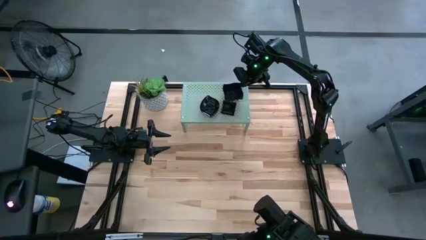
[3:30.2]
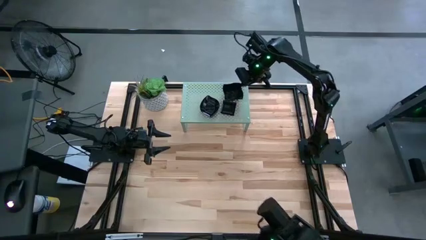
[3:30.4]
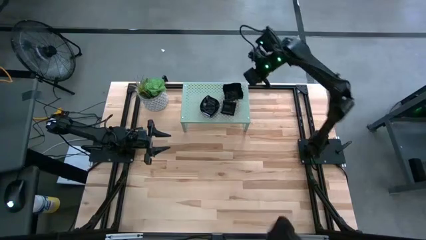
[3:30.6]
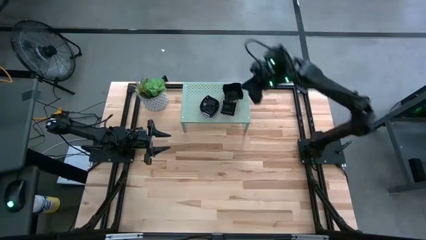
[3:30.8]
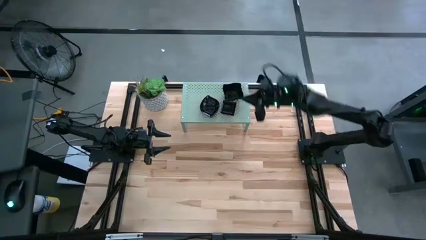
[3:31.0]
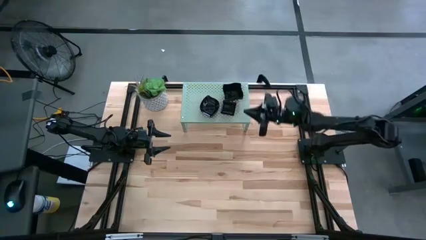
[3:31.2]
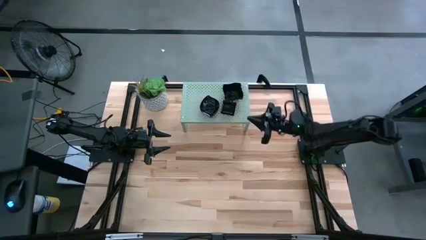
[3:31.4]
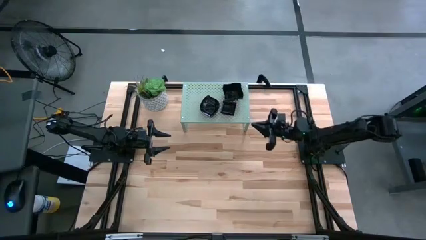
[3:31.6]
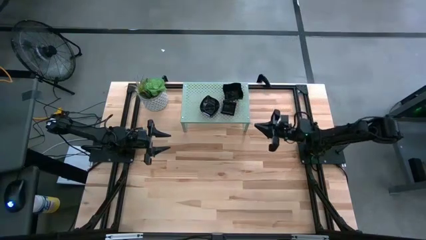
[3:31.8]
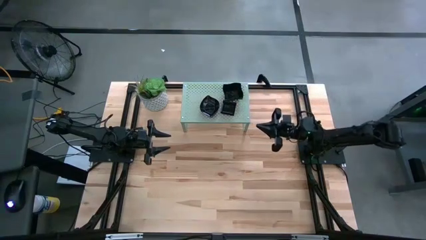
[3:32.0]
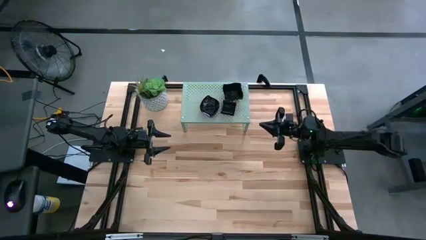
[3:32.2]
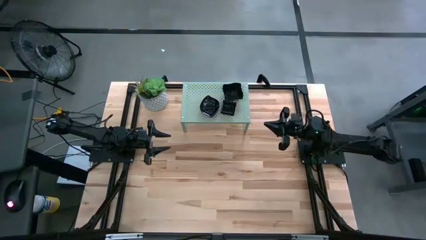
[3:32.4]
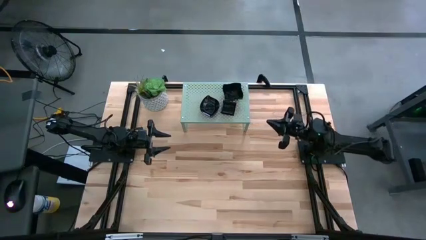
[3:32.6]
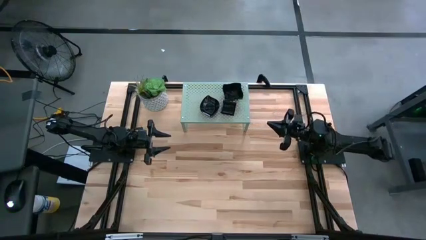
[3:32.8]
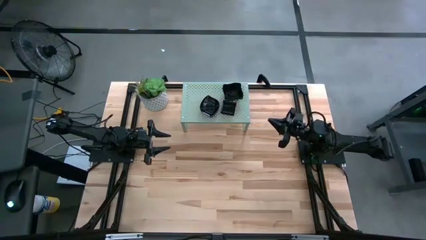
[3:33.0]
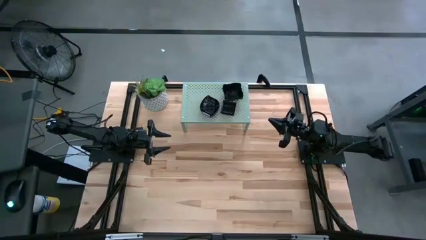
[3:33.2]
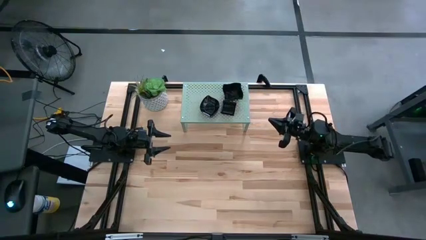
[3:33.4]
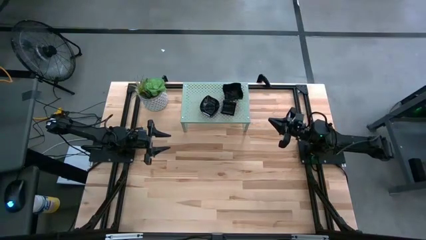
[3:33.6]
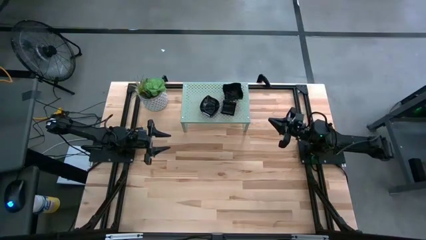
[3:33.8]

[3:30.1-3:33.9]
Task: Pick & Place Mini shaped plates
Return to Home Position

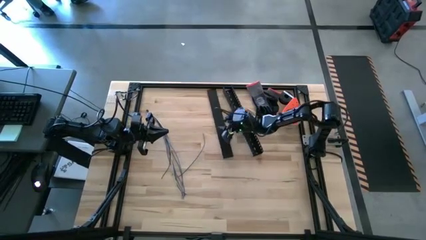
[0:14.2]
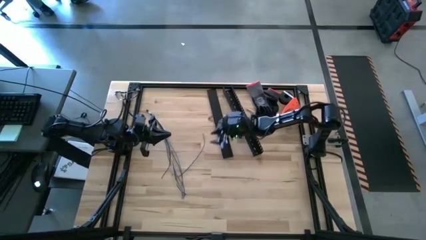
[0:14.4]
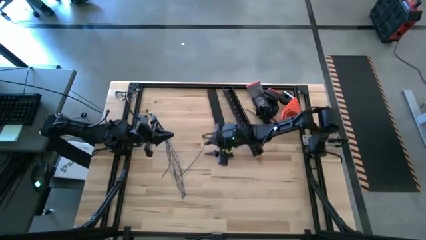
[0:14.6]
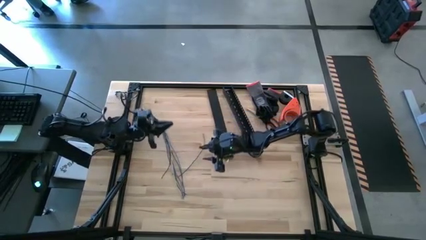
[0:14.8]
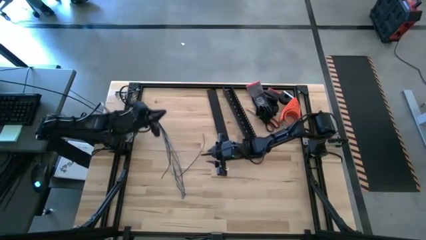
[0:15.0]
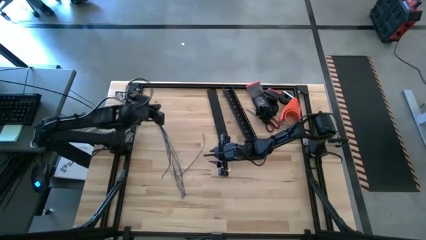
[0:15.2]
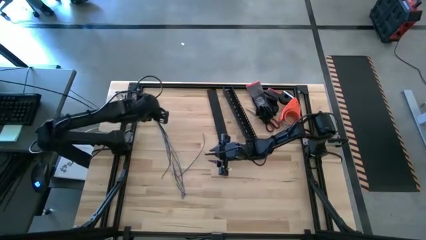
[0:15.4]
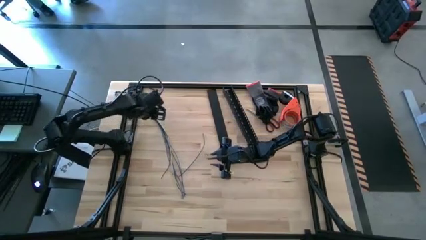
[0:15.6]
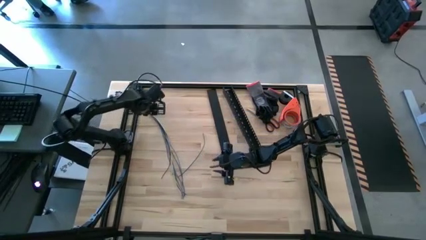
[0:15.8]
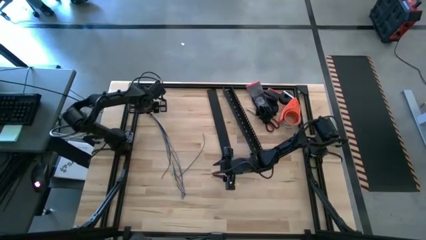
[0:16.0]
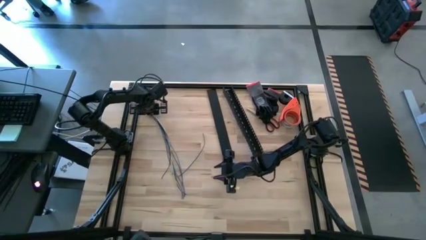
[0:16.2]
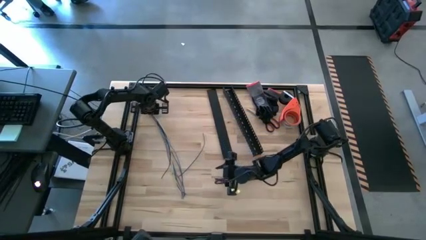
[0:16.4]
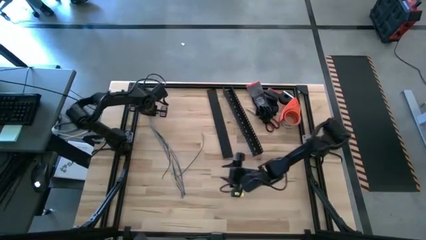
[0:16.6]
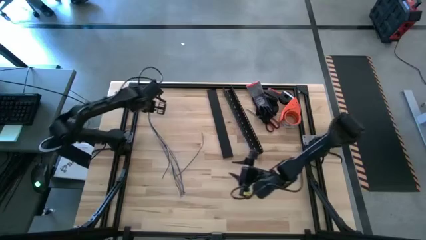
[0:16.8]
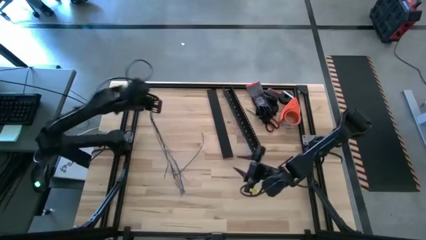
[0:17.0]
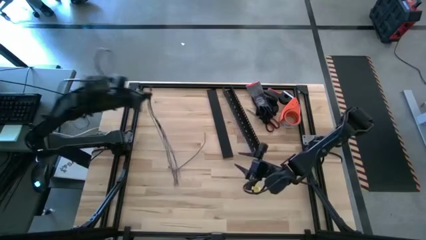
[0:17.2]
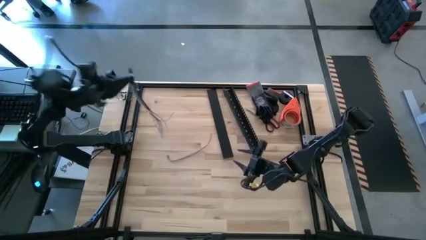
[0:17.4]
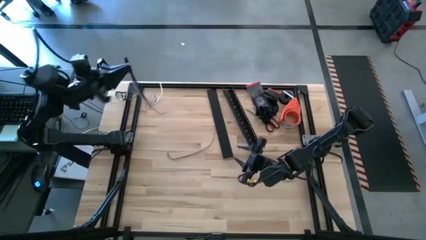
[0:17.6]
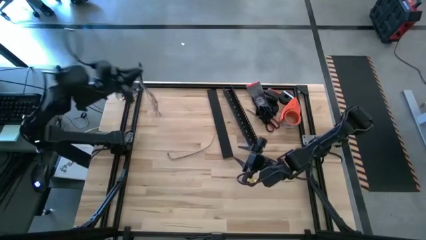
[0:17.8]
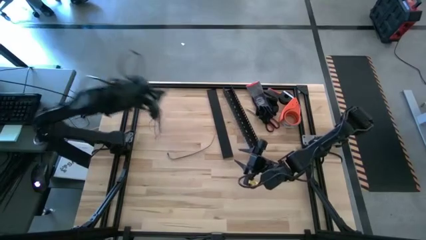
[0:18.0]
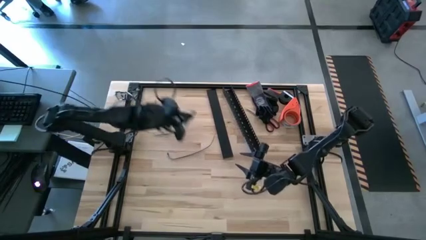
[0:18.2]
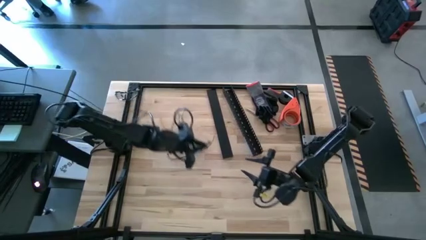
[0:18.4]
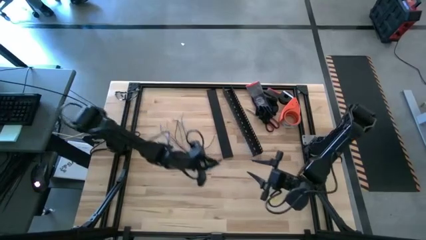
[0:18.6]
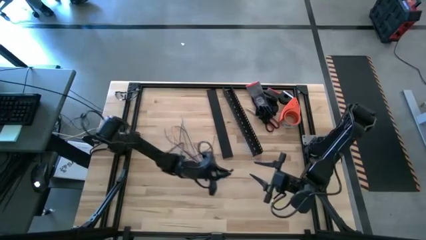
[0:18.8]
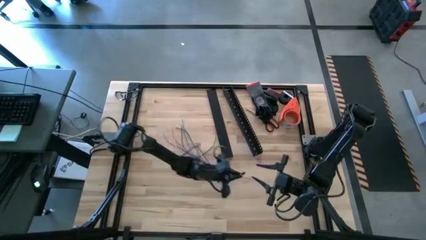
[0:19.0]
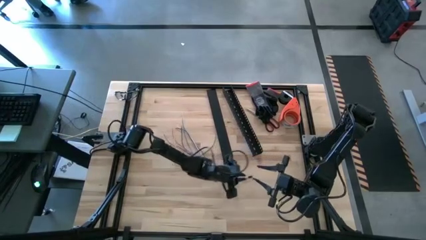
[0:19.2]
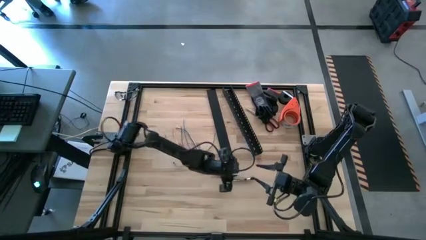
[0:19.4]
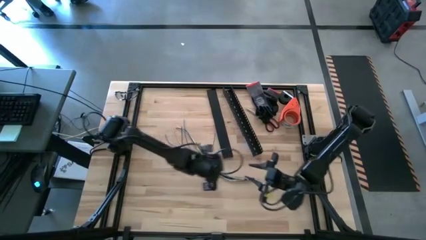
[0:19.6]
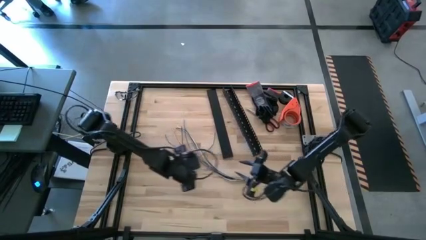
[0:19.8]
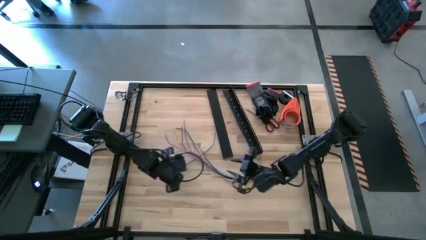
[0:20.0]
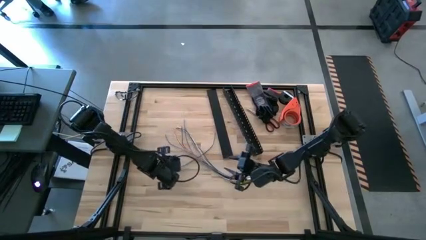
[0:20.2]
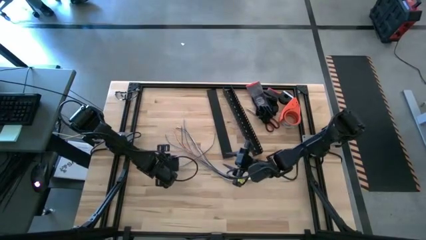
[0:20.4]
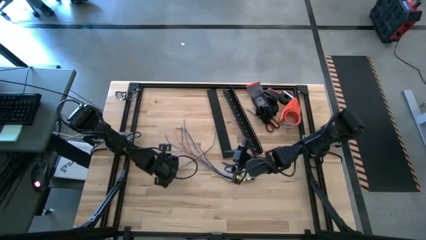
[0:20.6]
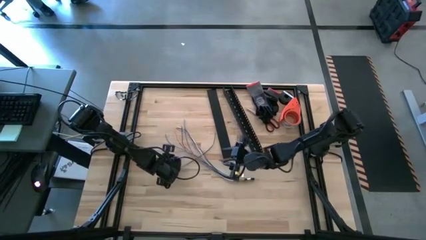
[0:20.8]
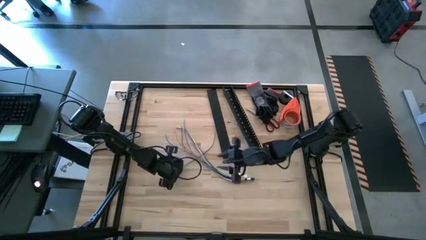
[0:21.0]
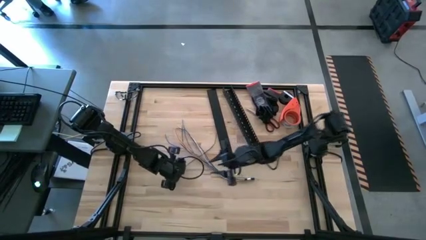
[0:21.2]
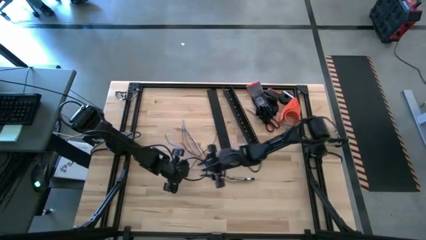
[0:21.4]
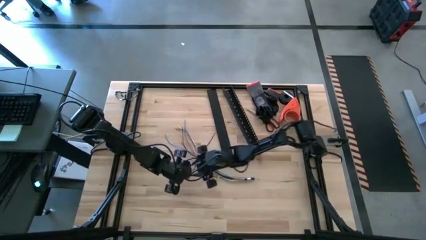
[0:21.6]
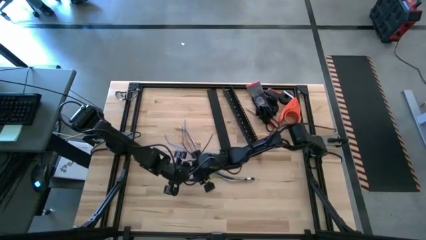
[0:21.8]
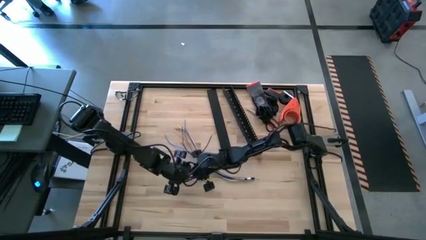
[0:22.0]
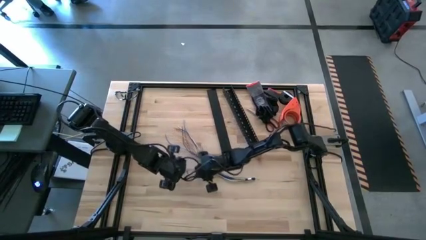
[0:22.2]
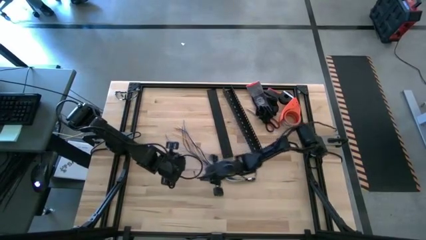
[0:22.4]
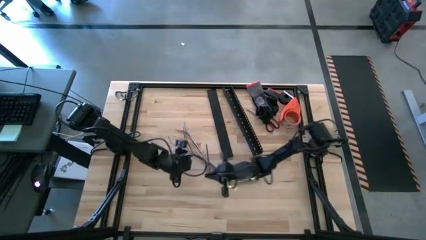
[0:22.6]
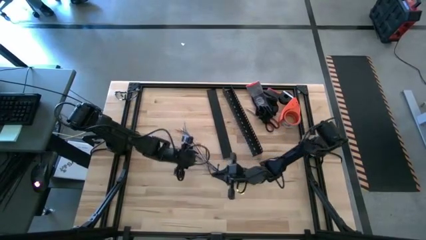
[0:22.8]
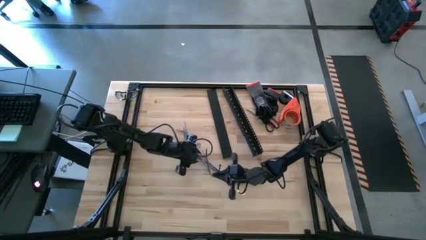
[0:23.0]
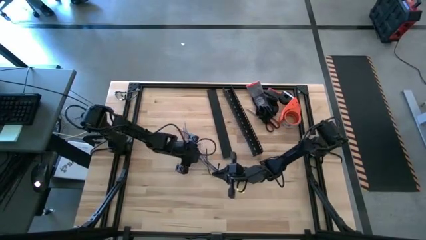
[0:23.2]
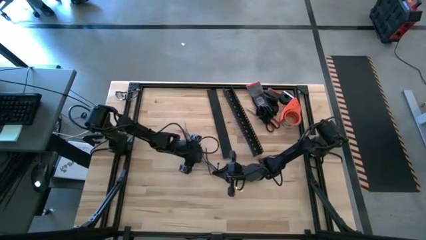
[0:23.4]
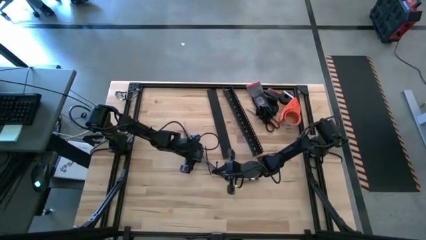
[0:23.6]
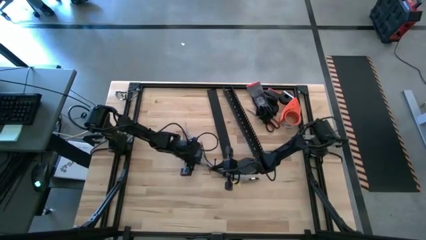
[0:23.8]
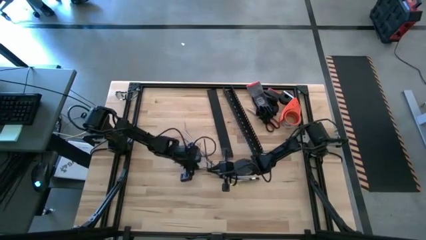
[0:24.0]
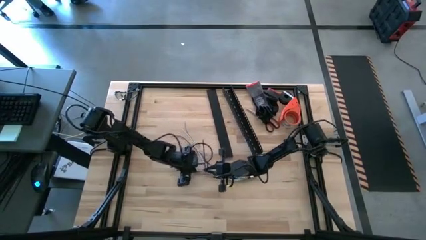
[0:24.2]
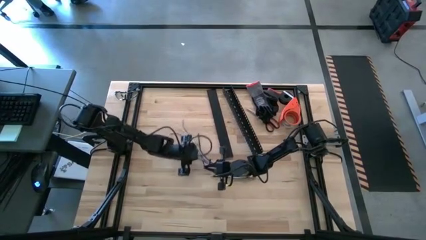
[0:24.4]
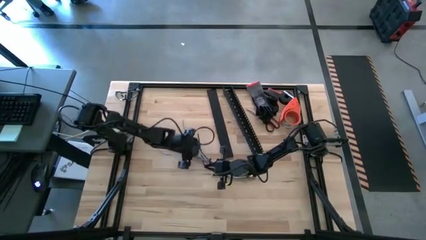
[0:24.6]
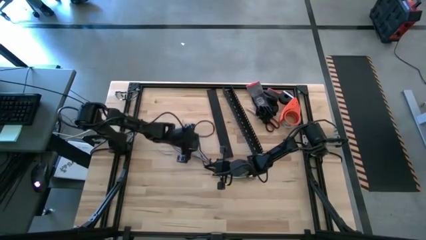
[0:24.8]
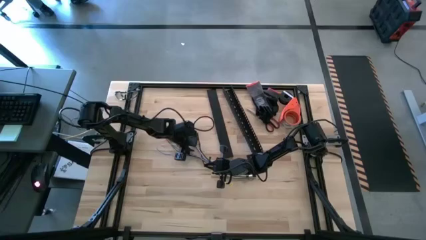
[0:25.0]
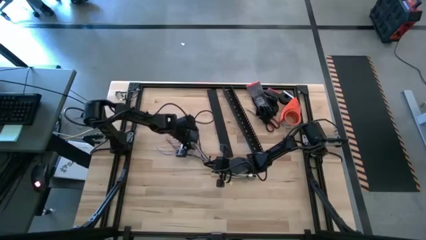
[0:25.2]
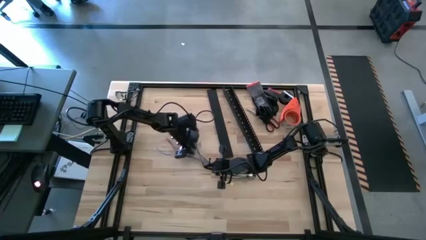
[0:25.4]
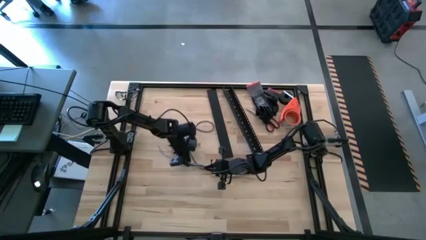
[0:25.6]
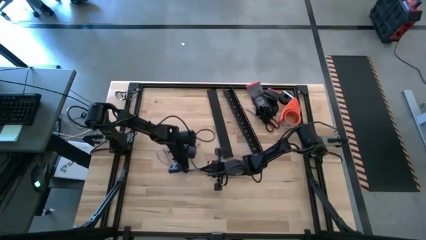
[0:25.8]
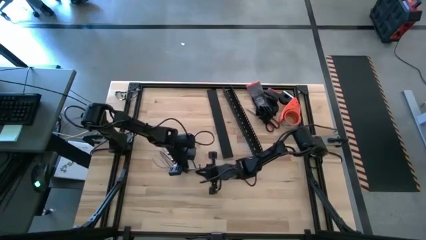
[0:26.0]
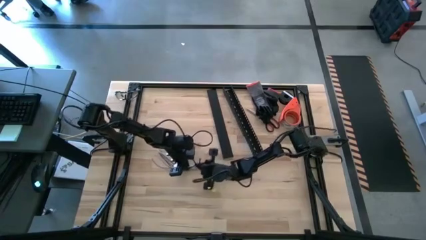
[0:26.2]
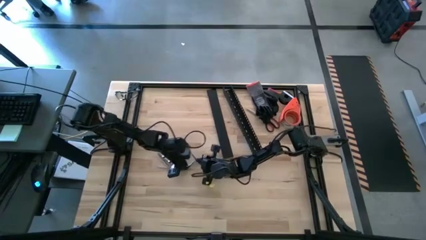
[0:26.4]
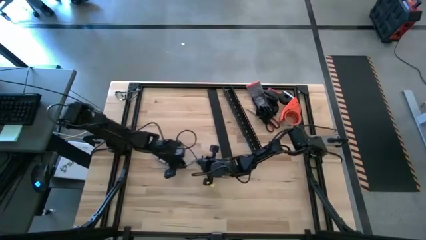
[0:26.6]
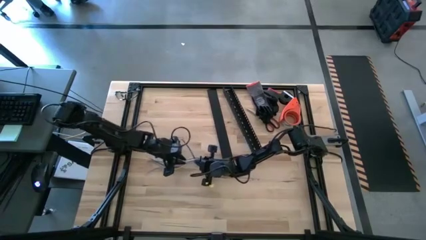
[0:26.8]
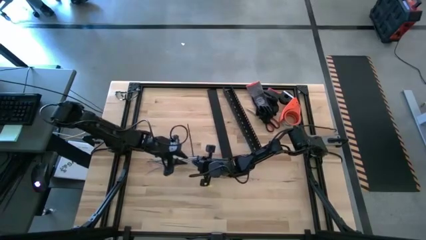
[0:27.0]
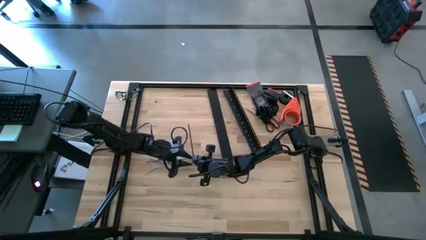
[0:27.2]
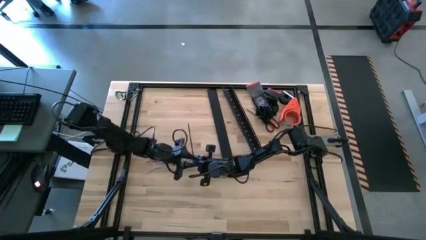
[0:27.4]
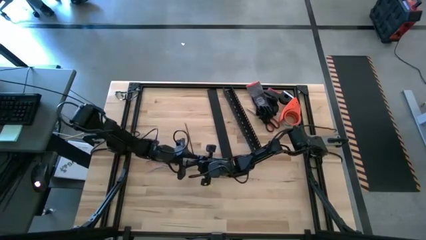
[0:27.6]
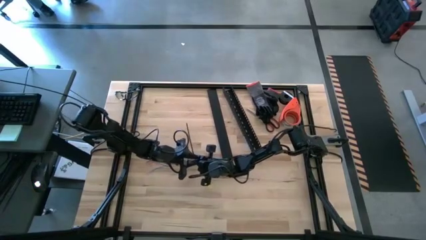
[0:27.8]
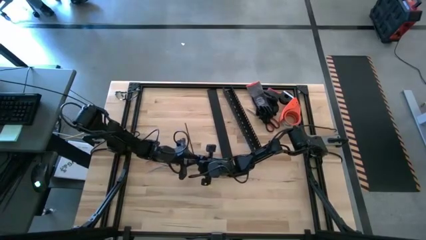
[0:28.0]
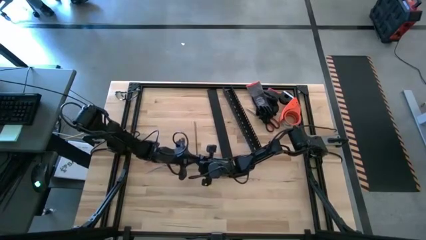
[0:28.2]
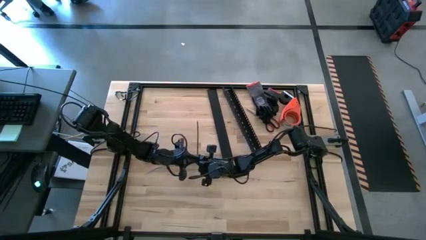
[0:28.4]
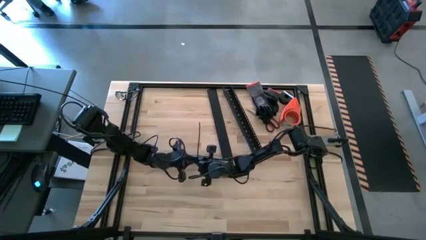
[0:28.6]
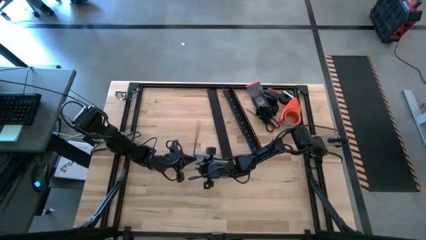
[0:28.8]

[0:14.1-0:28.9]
Task: Ziptie cables
Wrap the black zip tie around the cable wires
